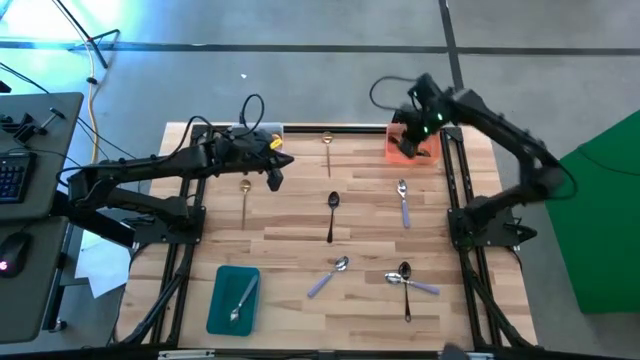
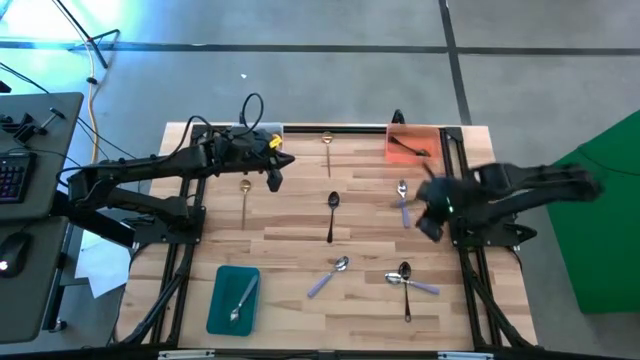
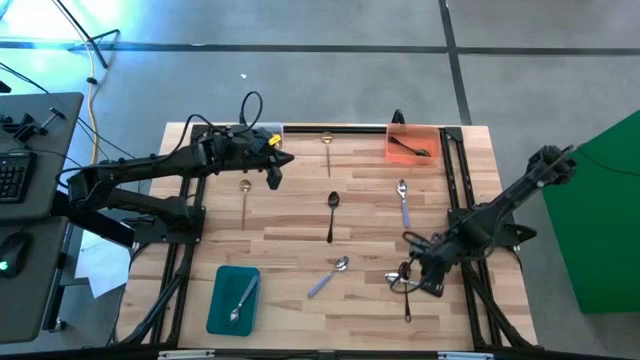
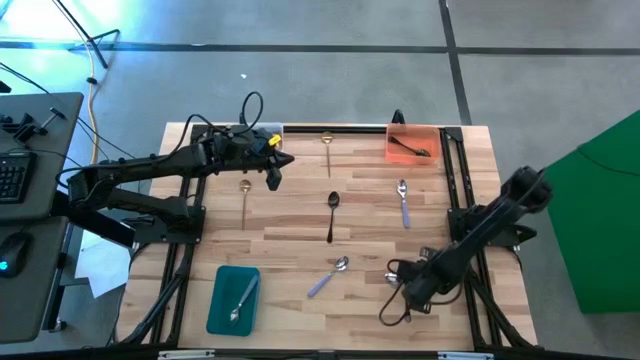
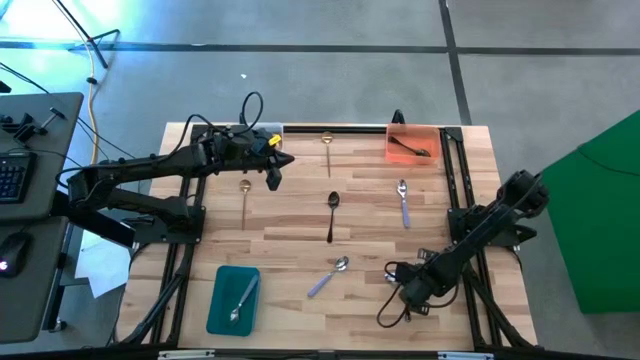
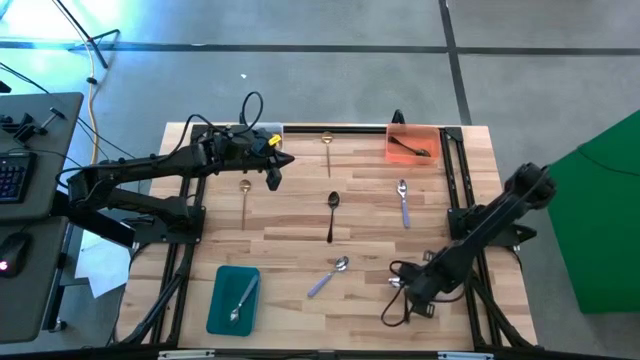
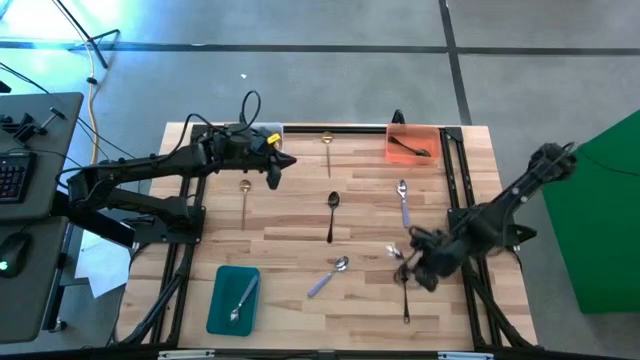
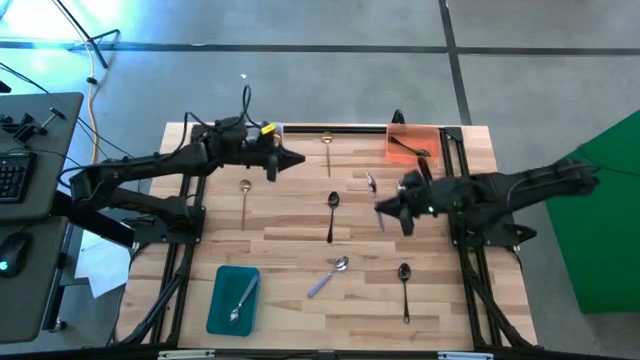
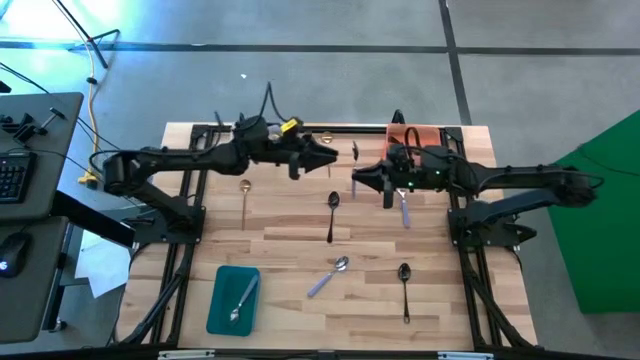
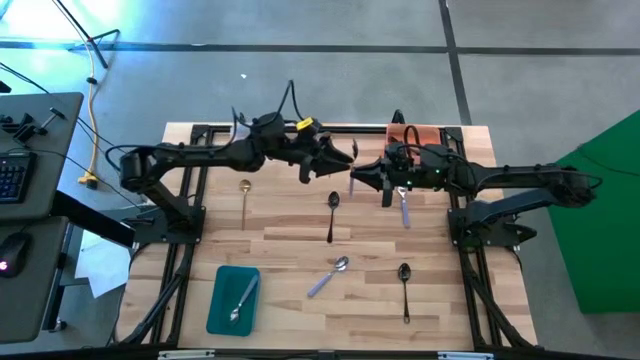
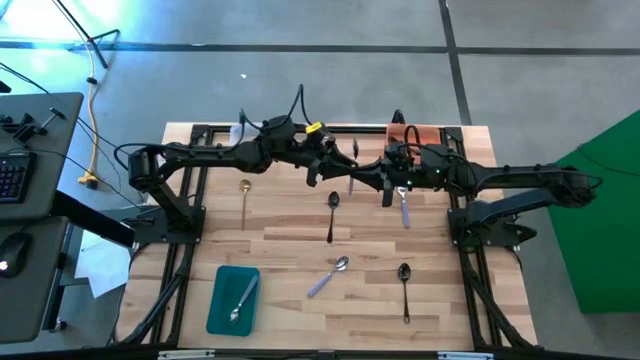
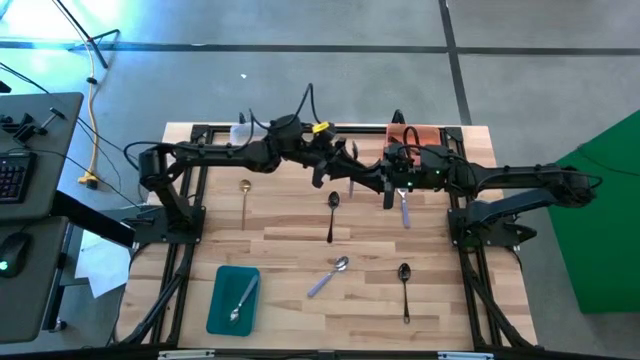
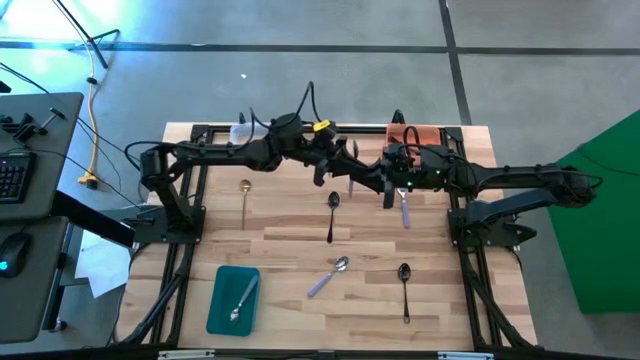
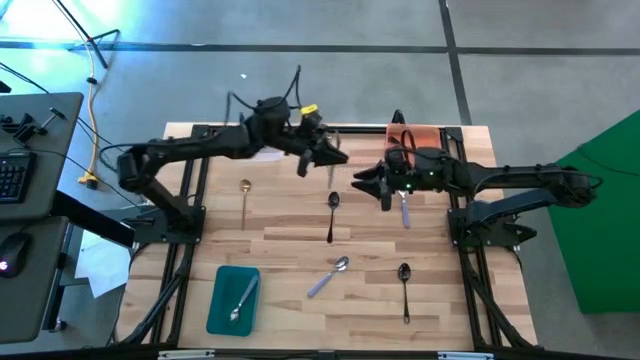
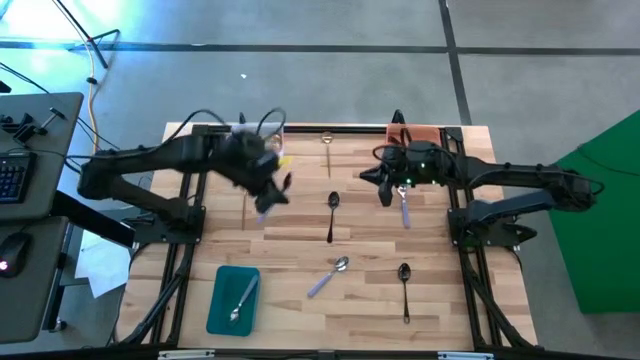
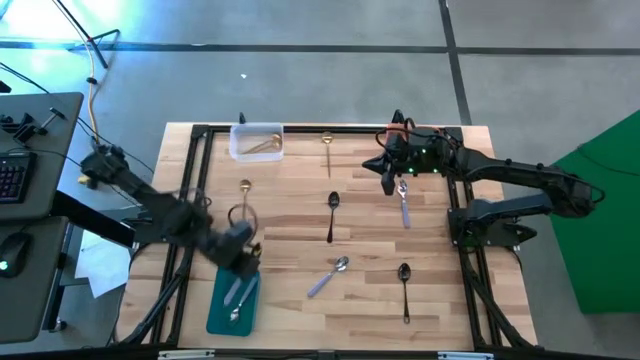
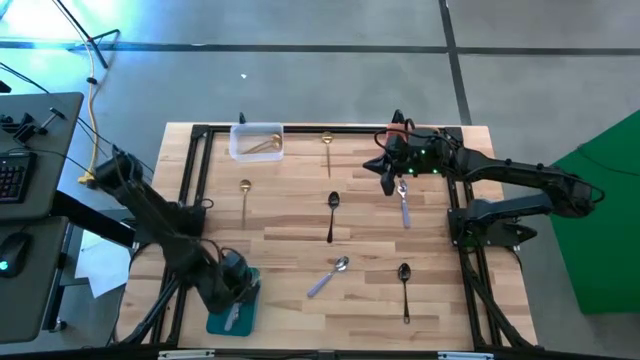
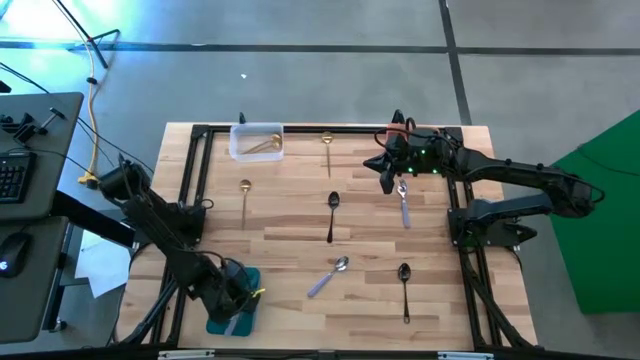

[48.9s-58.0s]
Task: Sort silverware by color (type)
Put the bottom right purple spoon into the blue bin

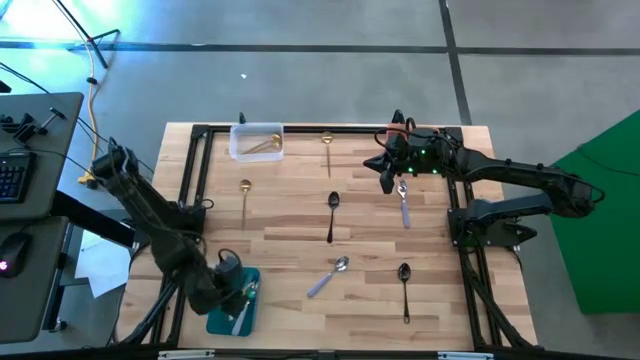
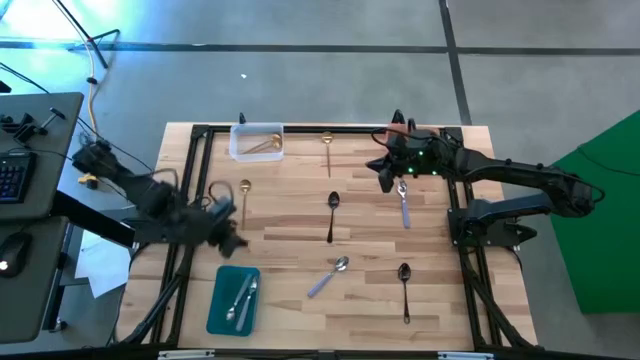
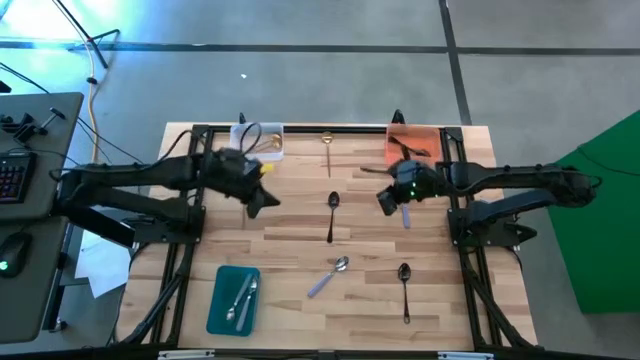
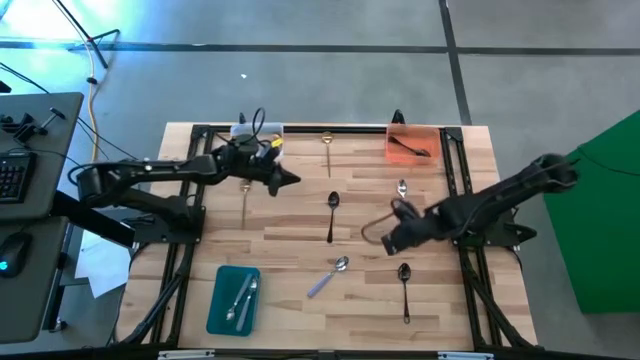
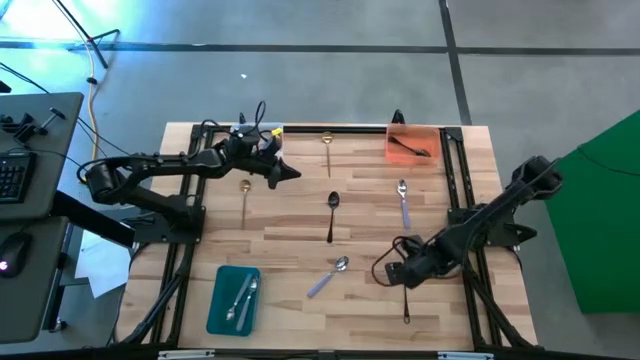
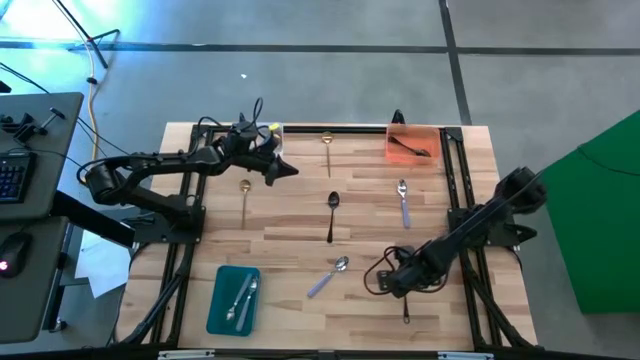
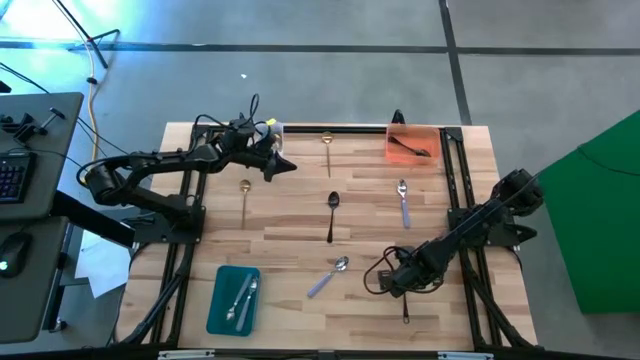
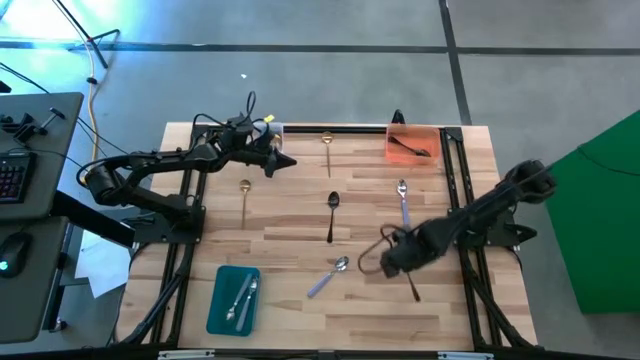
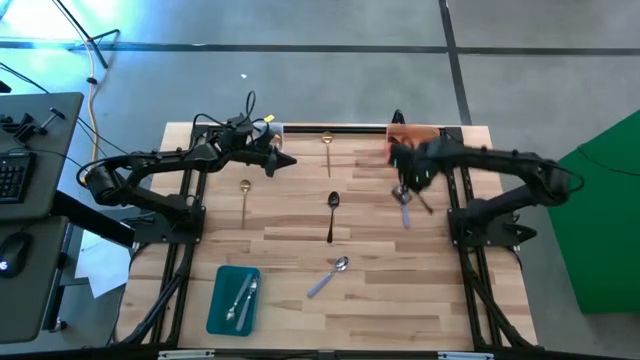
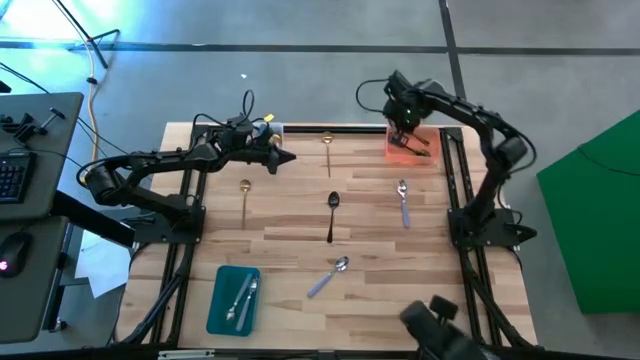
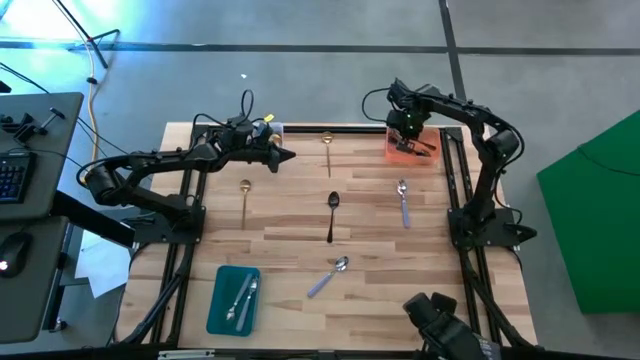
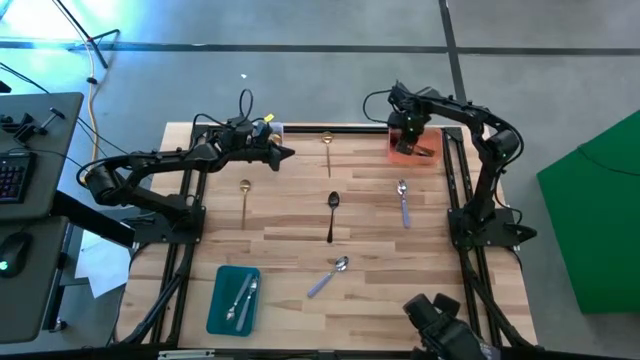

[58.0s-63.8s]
Put the bottom black spoon into the orange bin

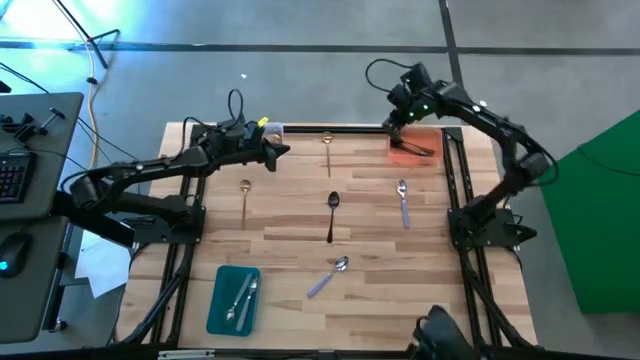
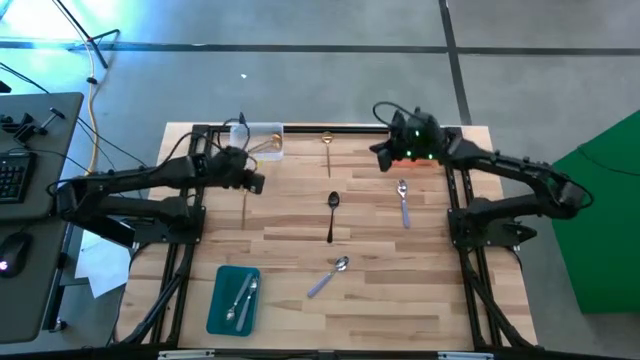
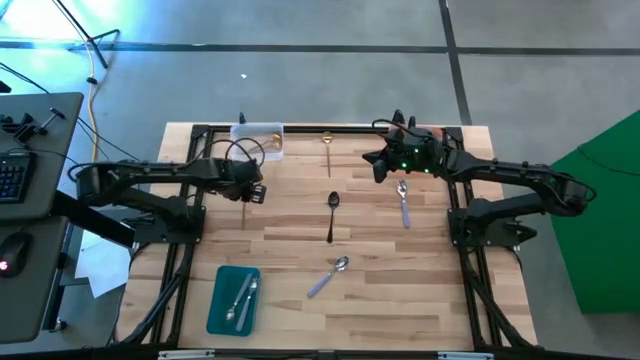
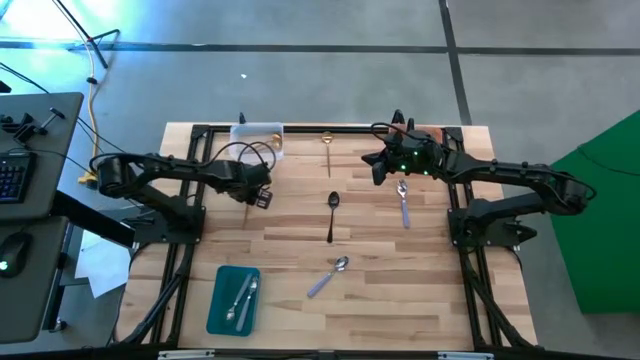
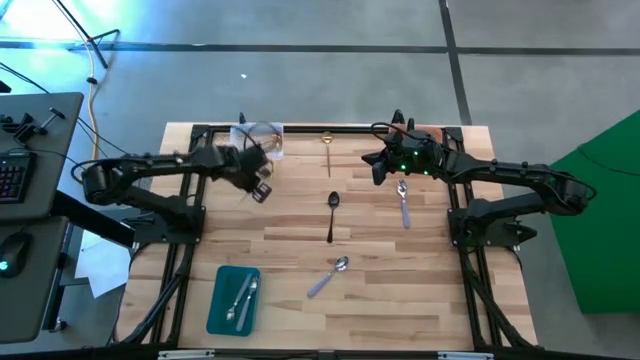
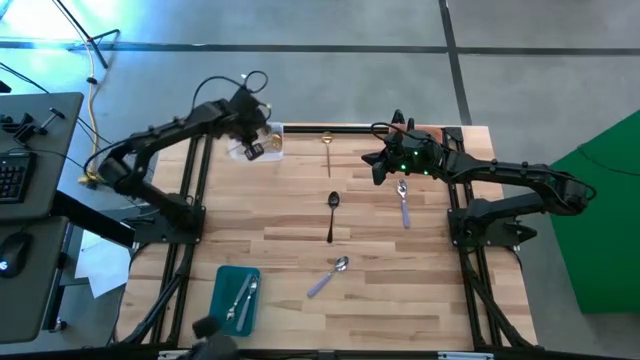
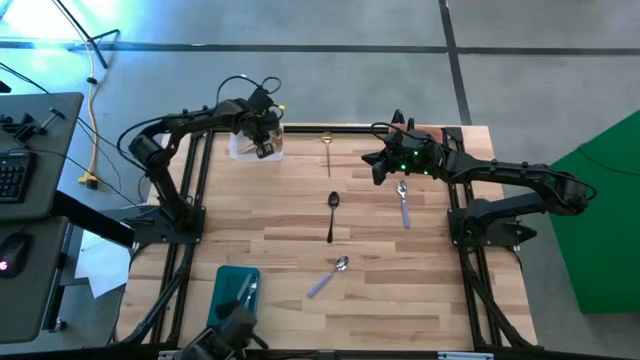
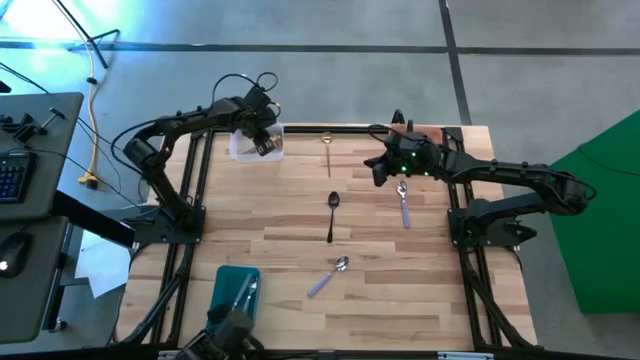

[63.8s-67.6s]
Put the middle gold spoon into the transparent bin
